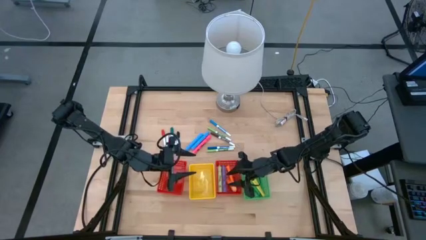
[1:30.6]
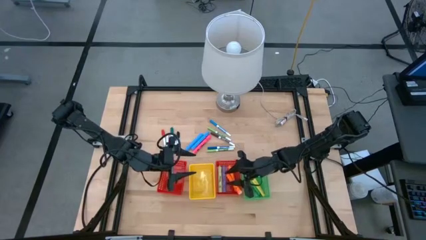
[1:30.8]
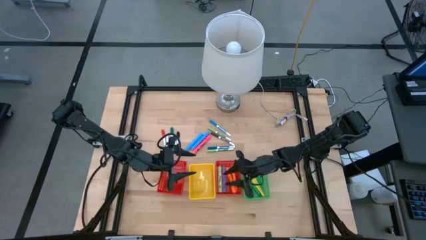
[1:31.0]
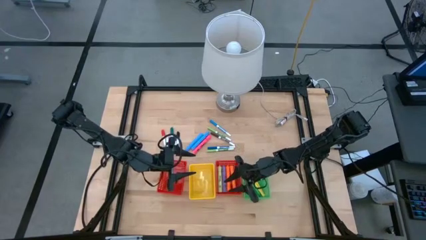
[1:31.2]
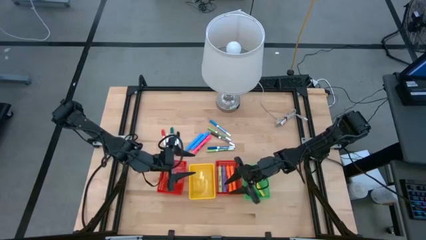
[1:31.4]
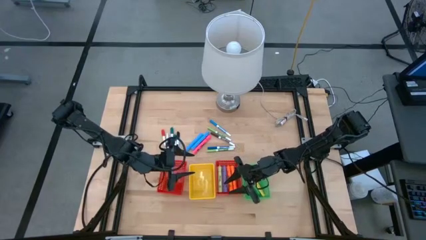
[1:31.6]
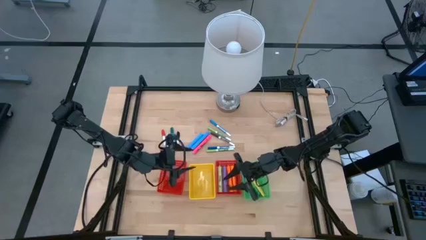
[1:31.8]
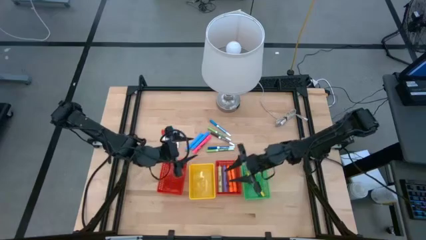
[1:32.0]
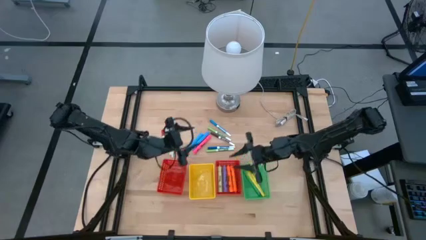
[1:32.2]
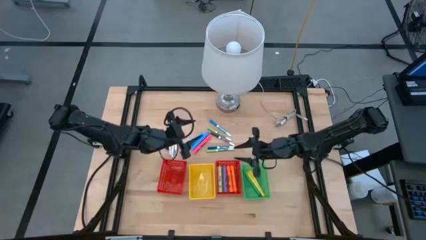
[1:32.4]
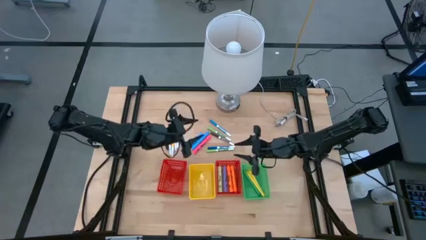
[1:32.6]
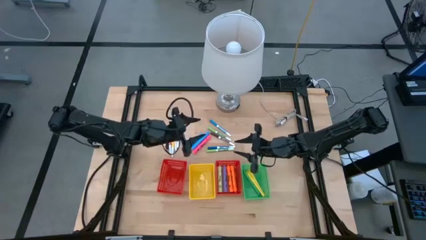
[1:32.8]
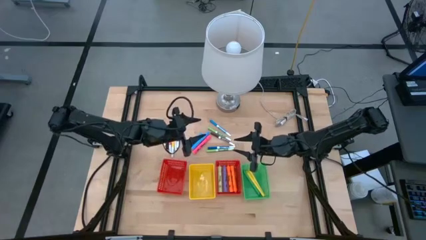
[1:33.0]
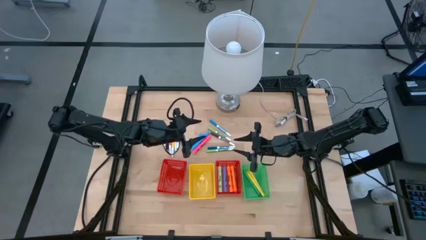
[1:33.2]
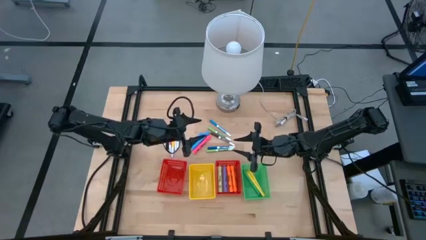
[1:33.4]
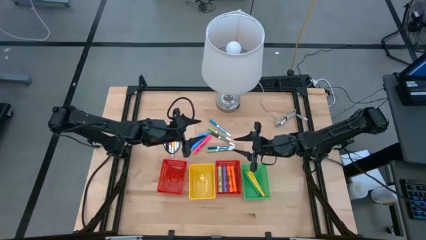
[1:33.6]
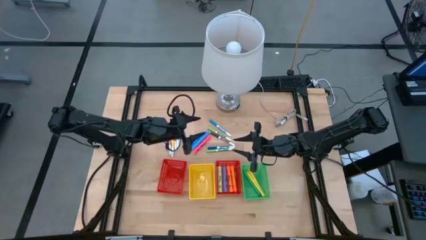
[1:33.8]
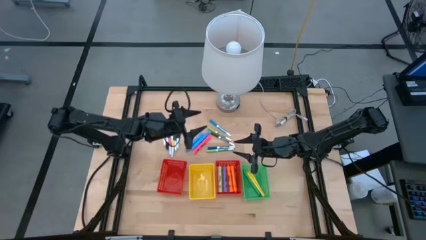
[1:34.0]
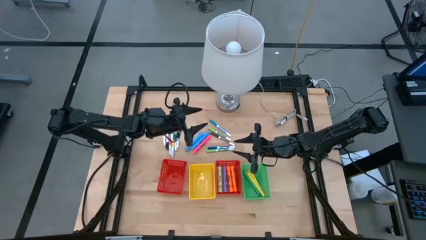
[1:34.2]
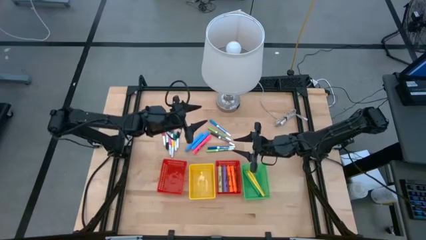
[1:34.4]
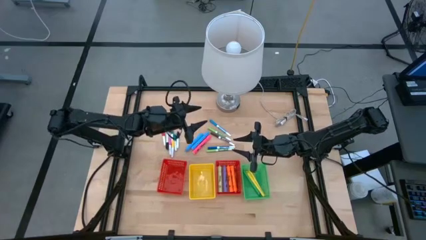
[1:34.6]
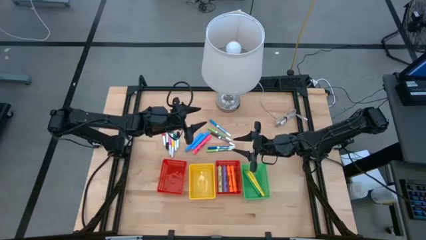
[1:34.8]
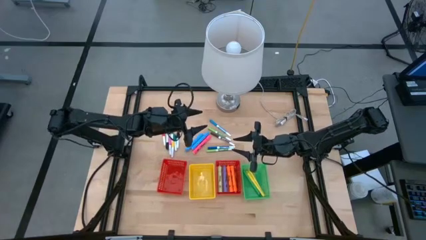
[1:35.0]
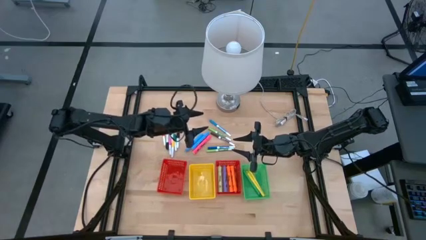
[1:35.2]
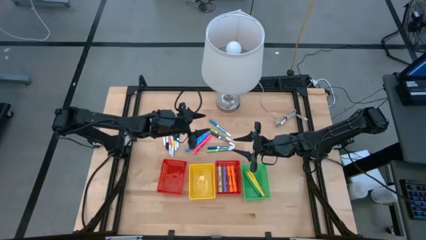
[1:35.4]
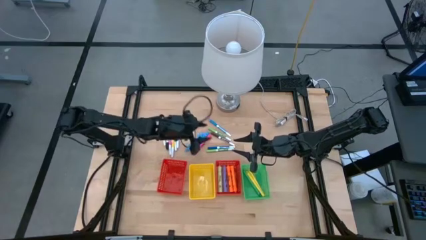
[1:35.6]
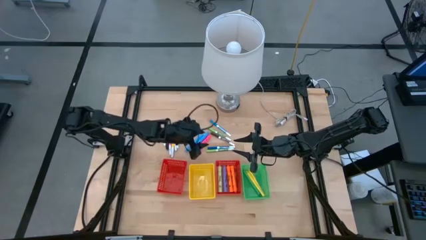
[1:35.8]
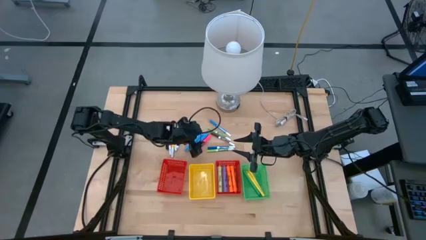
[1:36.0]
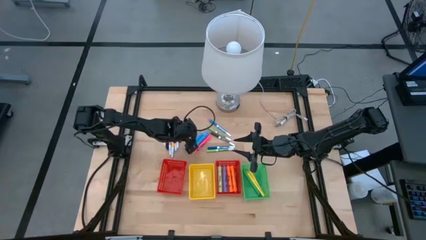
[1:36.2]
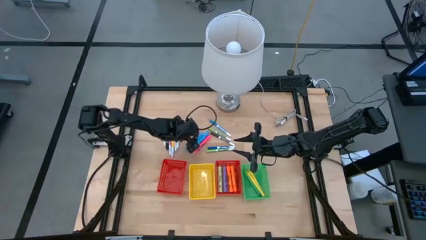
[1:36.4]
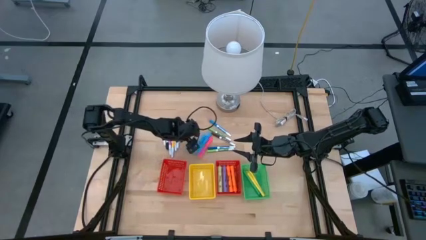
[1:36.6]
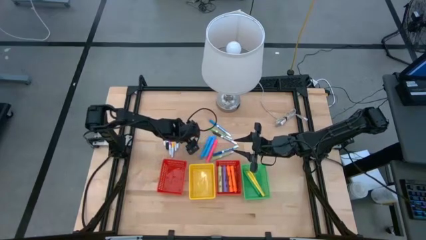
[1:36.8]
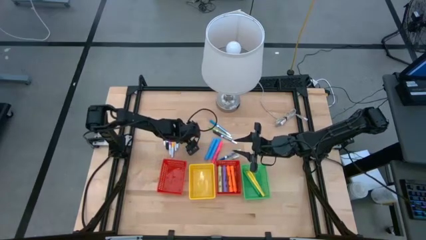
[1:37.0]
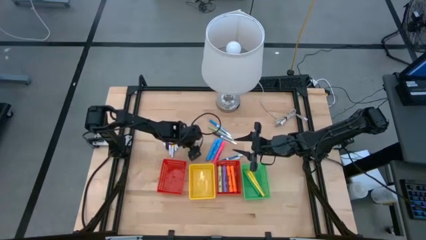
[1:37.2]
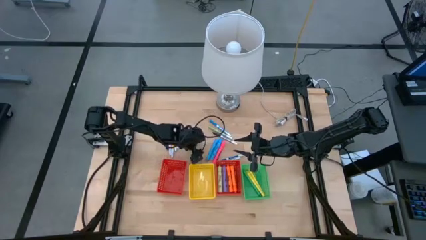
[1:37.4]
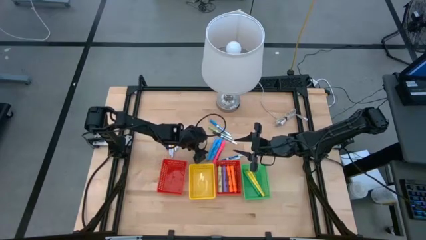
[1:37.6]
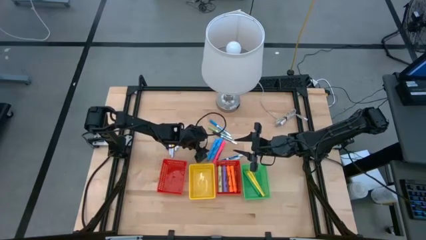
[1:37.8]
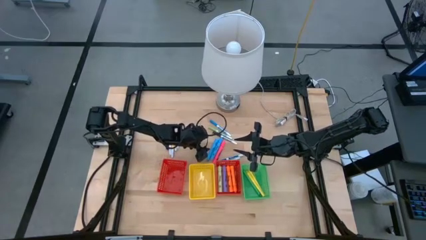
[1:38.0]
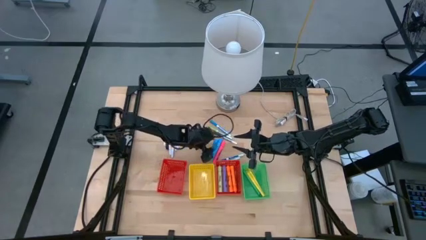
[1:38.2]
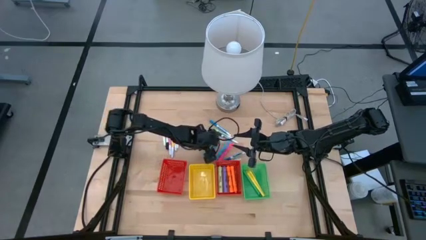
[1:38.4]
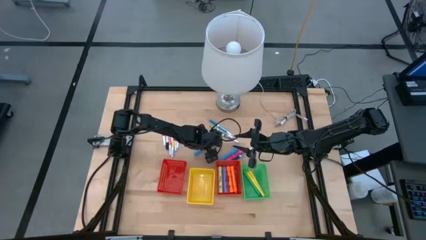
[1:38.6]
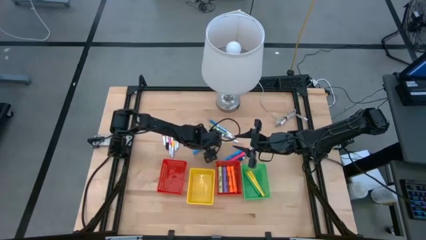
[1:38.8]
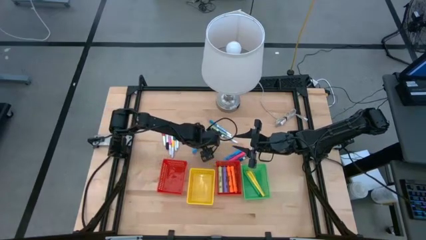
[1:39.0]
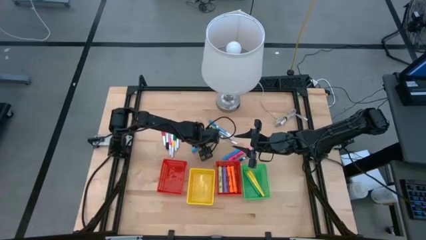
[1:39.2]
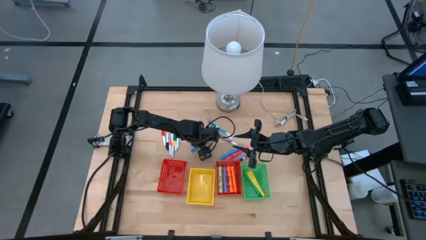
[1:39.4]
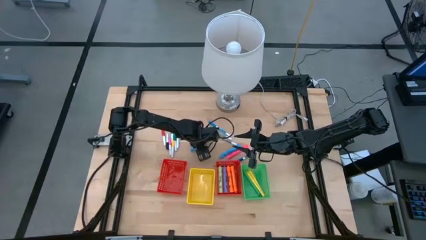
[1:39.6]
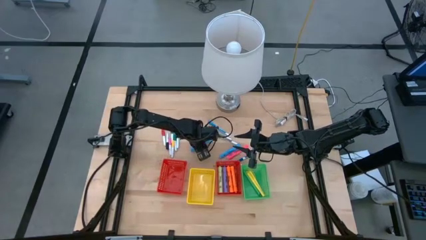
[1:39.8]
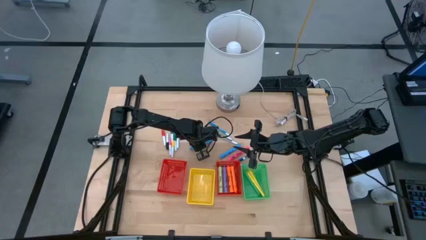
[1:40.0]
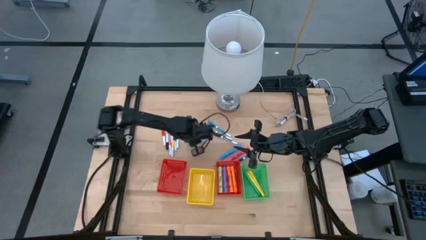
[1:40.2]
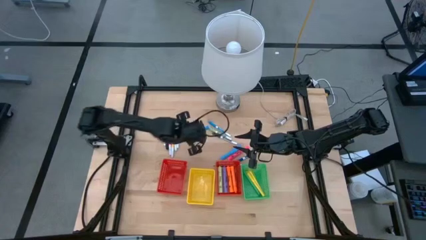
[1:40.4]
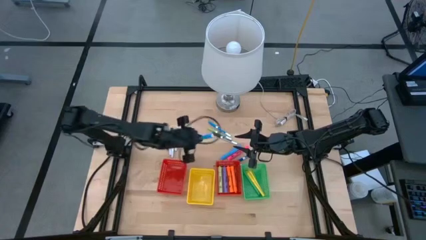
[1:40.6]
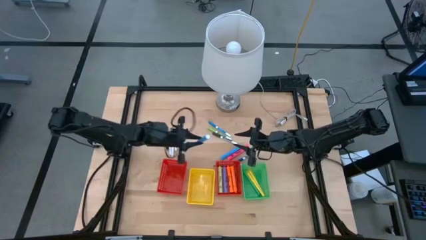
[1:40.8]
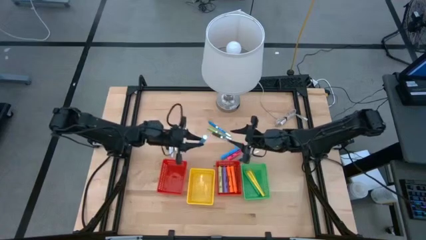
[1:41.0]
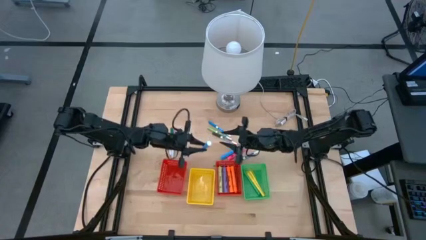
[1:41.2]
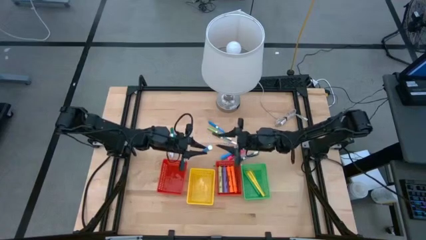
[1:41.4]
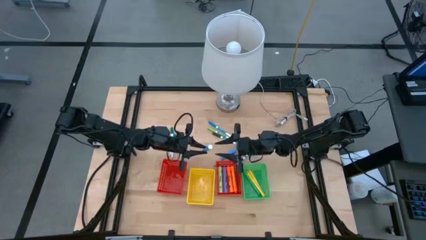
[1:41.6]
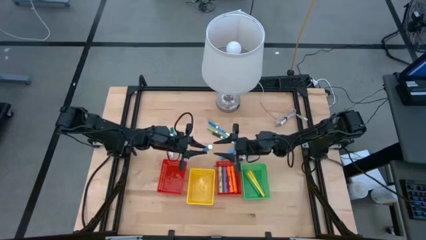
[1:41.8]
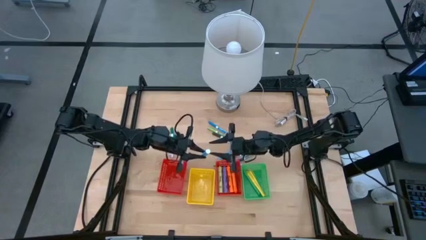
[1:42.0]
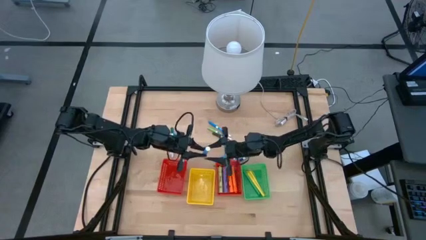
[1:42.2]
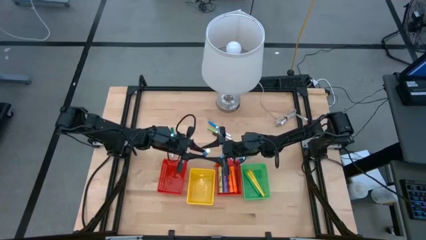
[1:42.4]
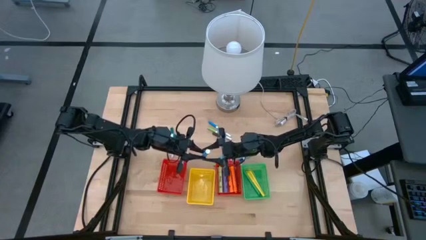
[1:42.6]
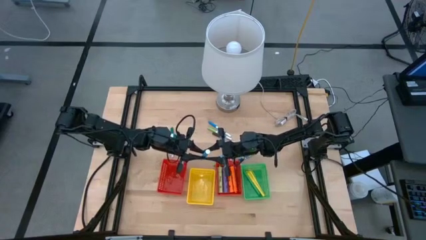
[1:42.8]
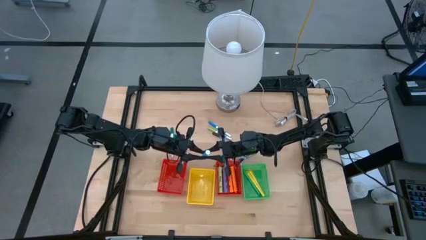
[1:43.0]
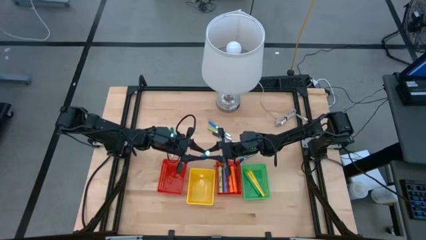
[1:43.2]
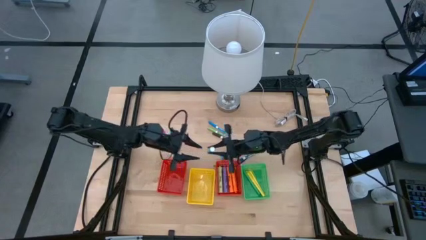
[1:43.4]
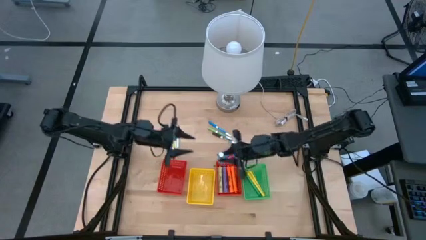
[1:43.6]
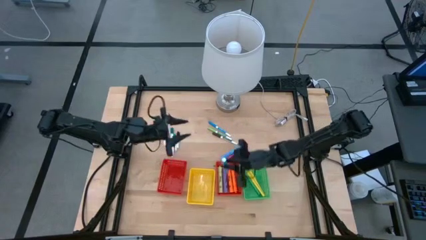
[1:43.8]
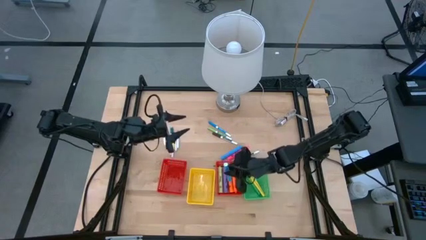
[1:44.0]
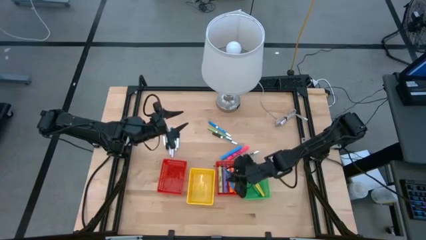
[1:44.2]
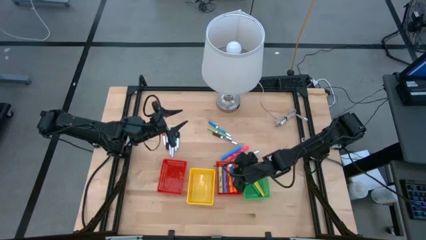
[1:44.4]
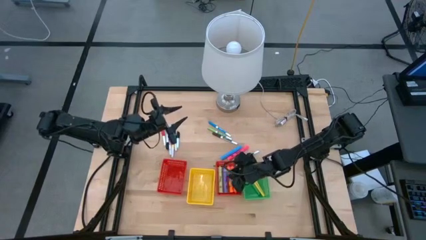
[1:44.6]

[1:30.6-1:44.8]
Task: Pick & Place Markers
Put the large blue highlighter into the right red bin
